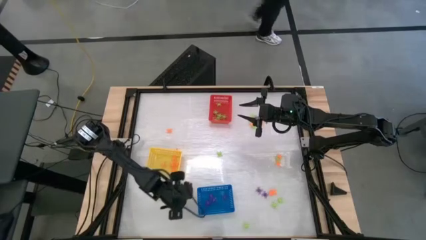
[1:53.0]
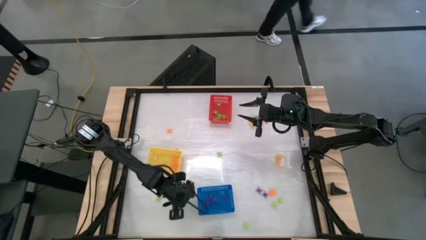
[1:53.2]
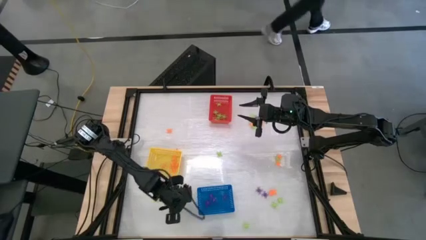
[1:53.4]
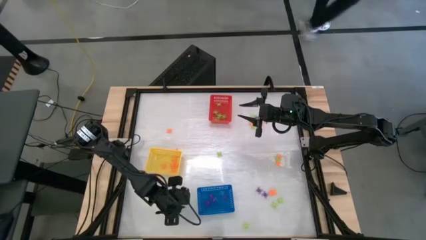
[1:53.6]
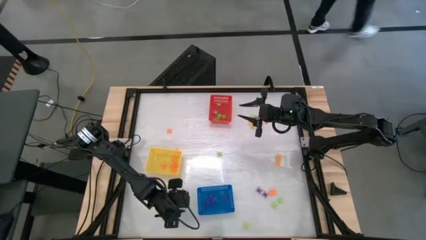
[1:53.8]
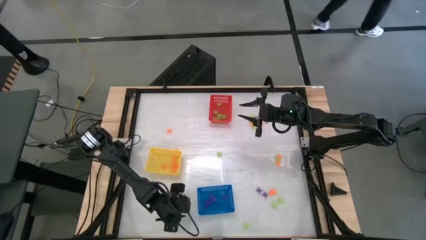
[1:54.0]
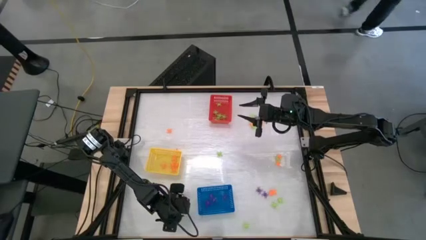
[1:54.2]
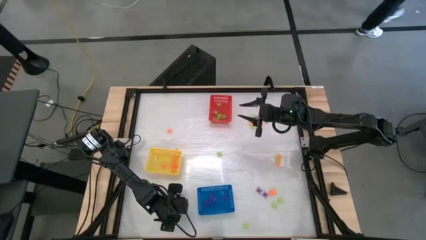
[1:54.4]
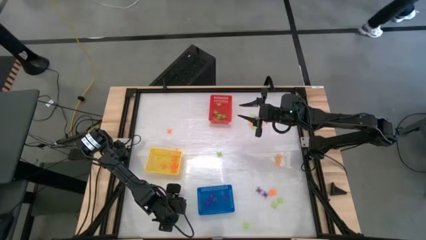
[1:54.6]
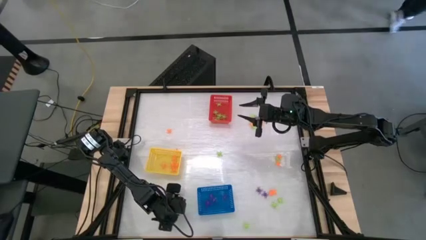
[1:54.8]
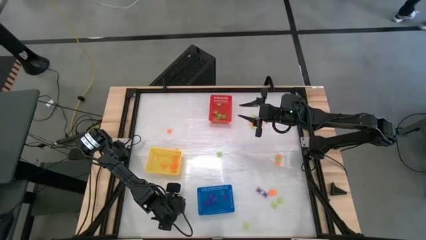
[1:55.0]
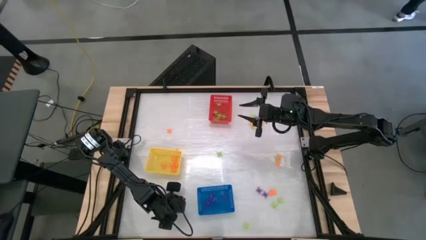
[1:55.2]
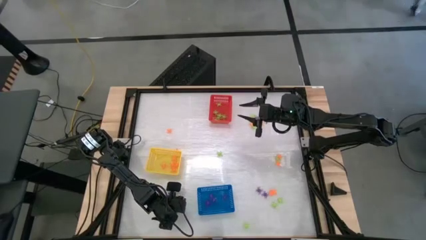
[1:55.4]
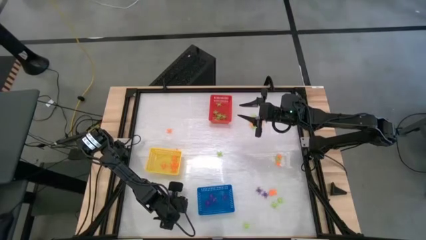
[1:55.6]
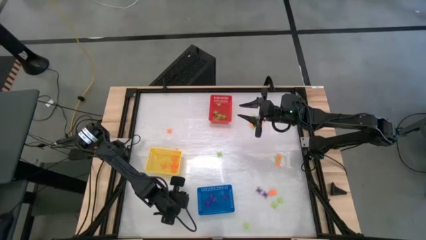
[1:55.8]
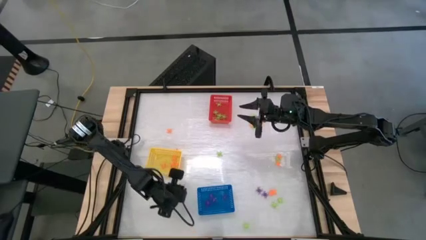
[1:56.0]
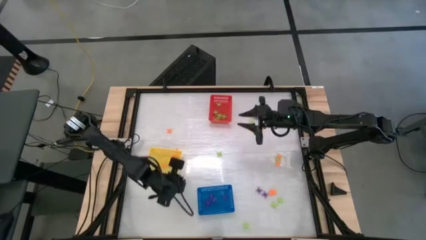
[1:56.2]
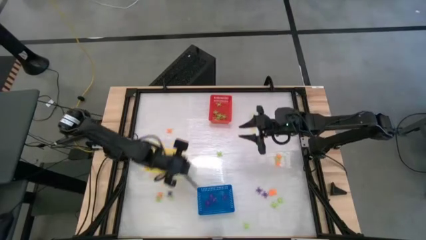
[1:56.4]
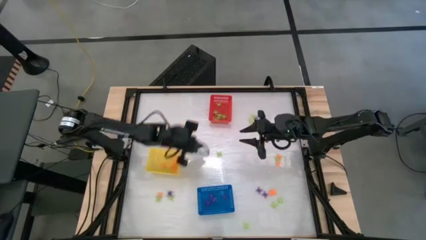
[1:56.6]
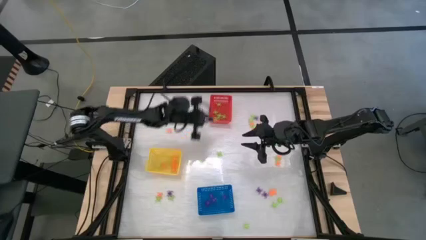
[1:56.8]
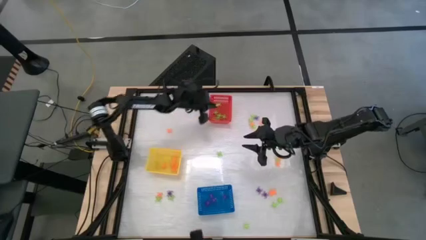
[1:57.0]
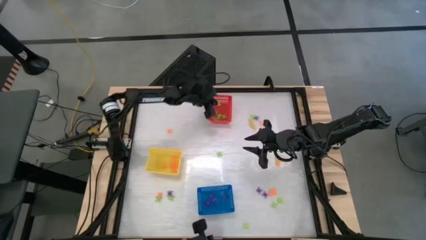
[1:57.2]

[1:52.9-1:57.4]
Task: Sort Halloween decoration
Put the green spider toy into the red basket

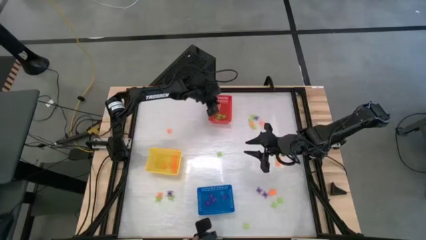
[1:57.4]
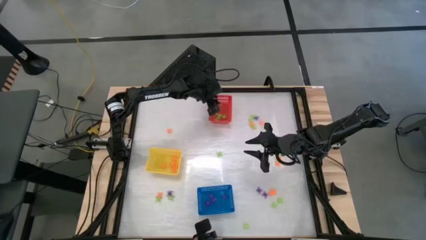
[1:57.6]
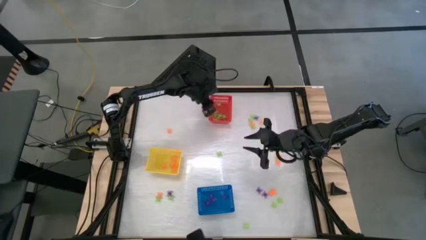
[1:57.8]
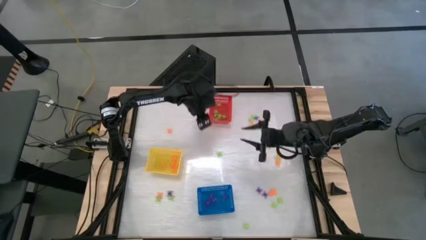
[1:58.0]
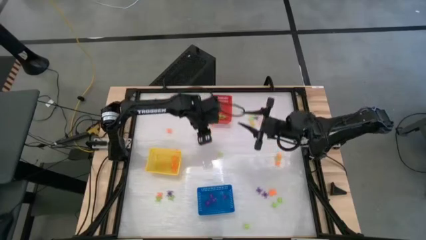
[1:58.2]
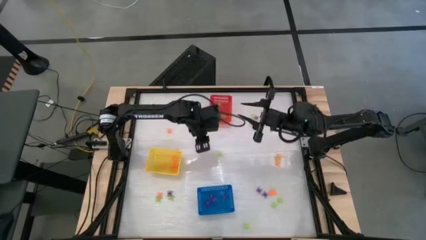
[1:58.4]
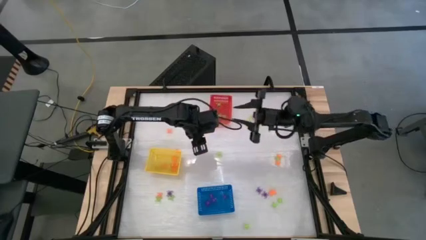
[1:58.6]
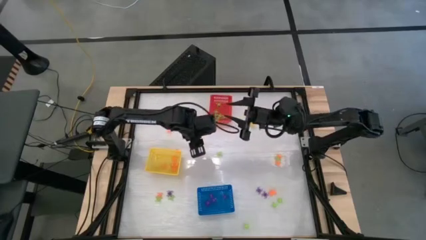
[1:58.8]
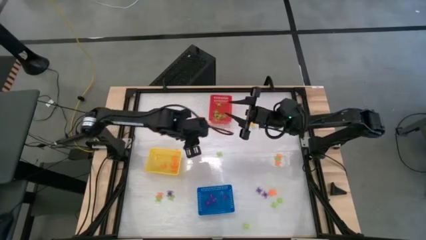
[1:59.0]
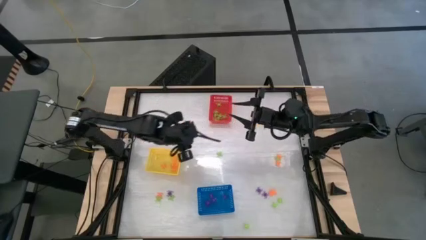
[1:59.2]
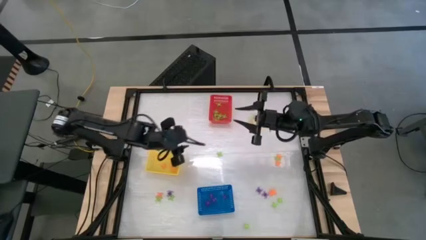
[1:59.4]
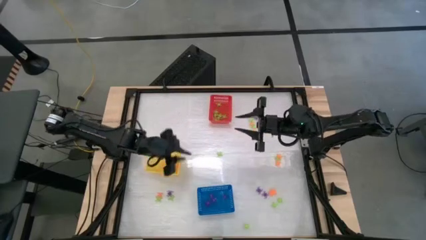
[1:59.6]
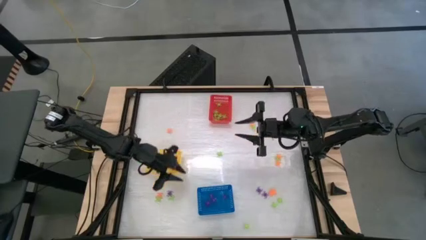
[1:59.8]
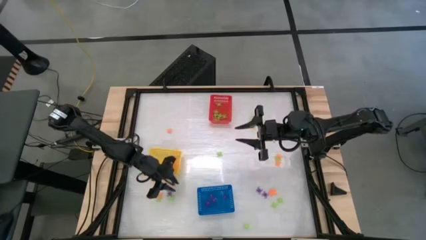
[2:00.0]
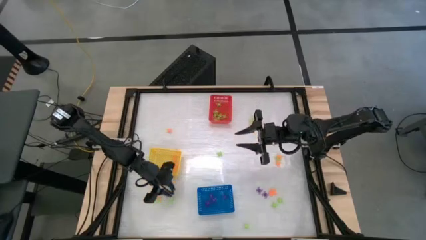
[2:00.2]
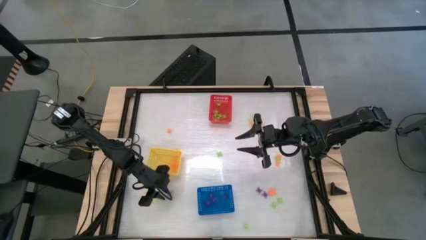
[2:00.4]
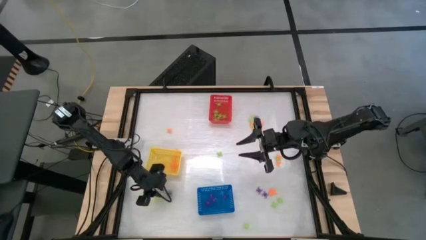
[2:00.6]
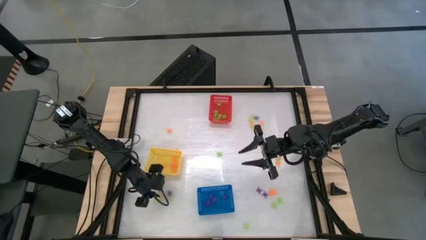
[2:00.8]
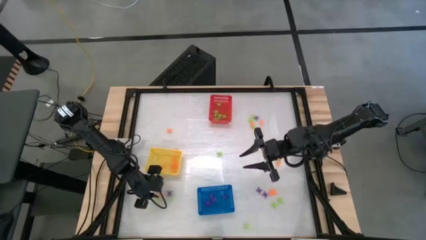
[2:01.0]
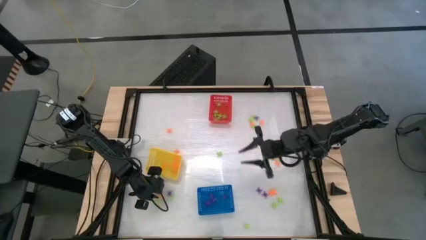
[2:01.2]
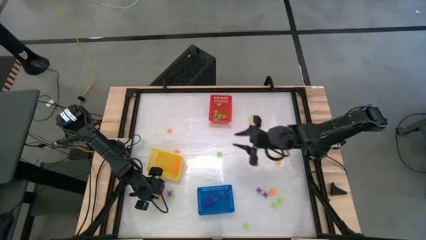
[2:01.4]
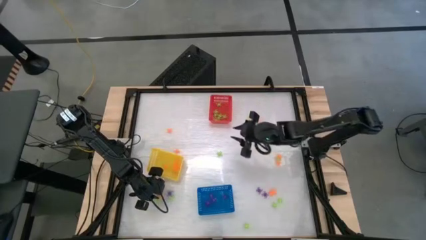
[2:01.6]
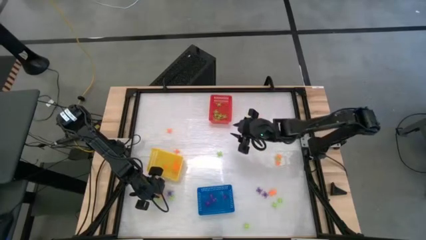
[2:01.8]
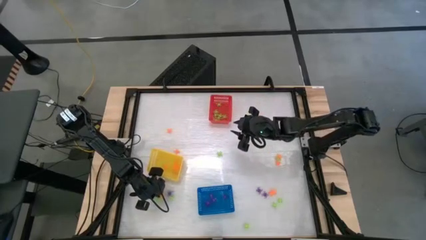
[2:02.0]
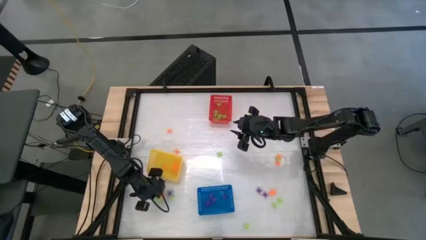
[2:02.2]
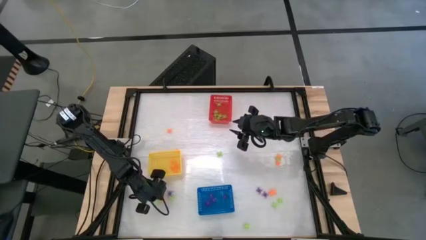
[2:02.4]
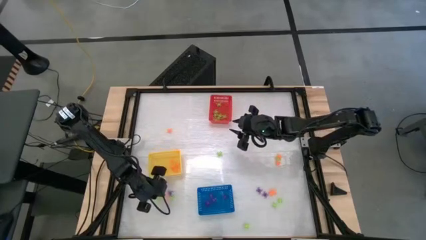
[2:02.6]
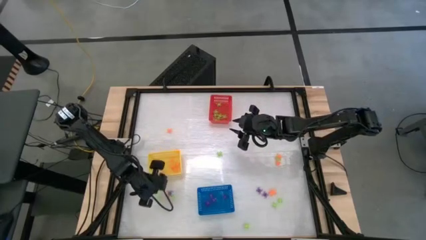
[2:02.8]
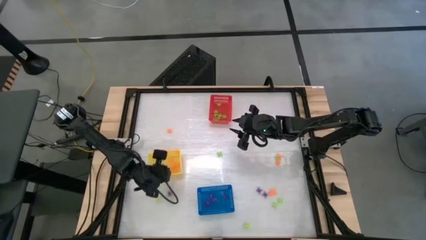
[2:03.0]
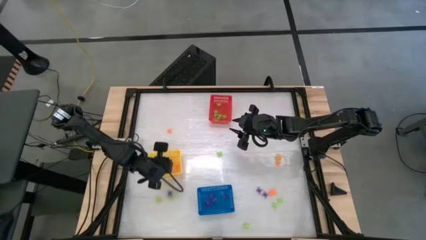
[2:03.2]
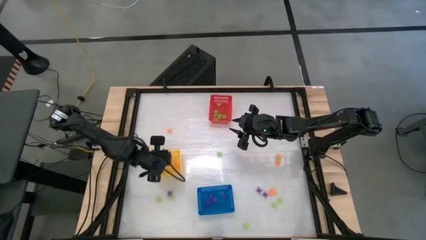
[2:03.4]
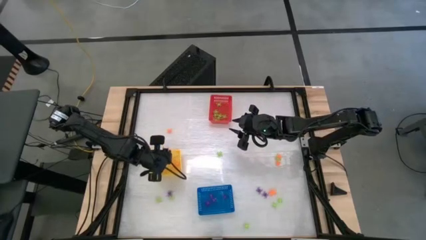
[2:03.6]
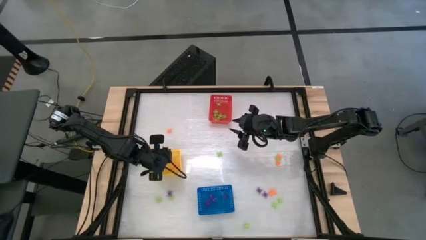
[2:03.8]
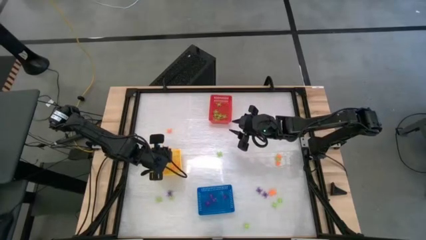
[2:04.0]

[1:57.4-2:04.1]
Put the orange spider toy into the yellow basket

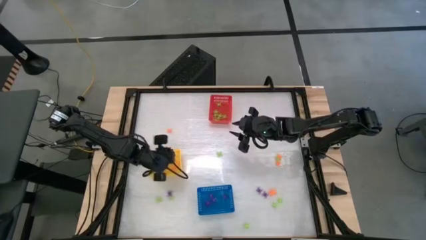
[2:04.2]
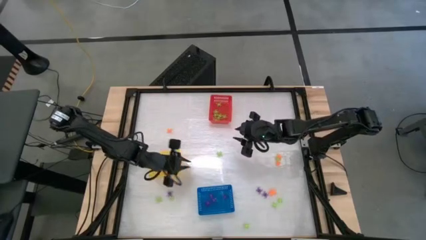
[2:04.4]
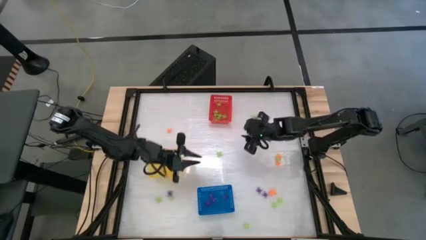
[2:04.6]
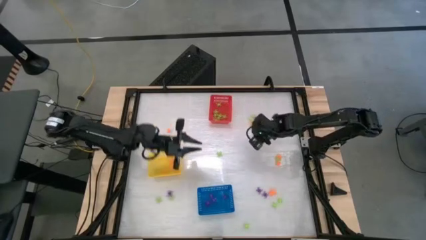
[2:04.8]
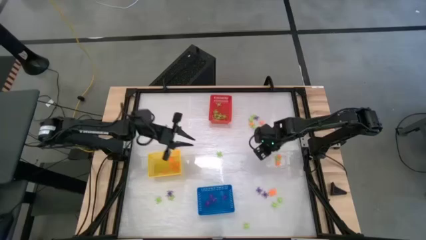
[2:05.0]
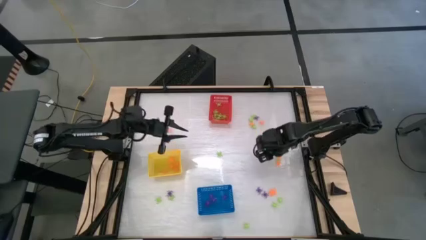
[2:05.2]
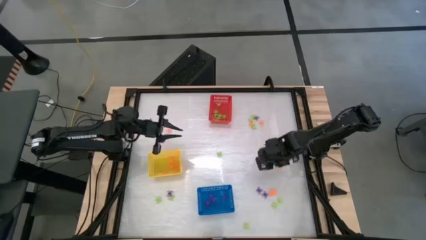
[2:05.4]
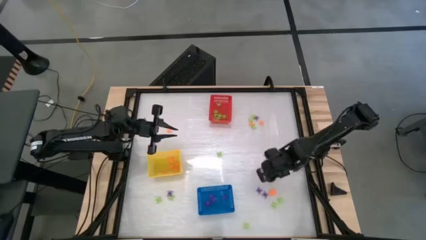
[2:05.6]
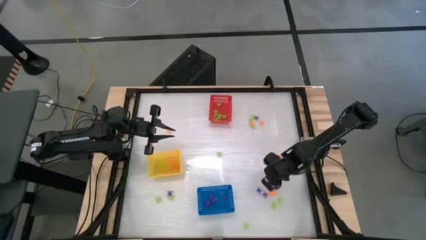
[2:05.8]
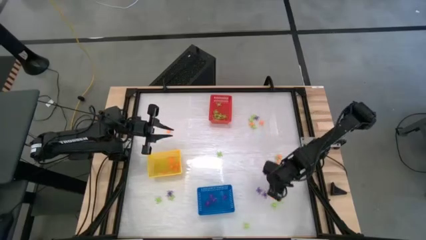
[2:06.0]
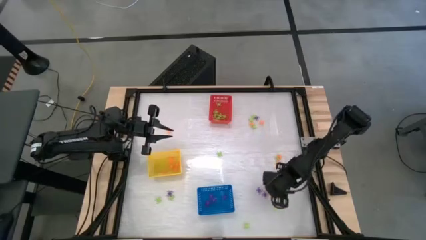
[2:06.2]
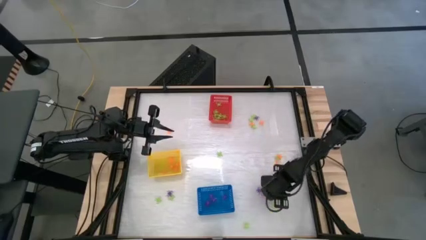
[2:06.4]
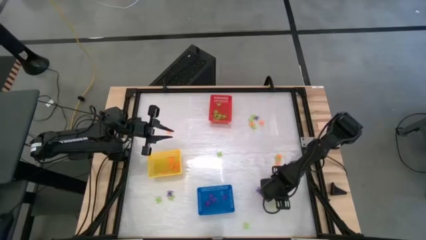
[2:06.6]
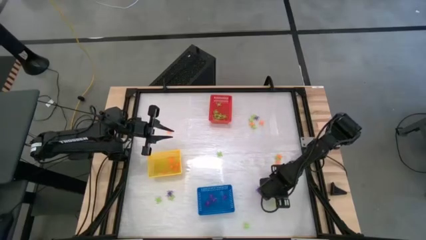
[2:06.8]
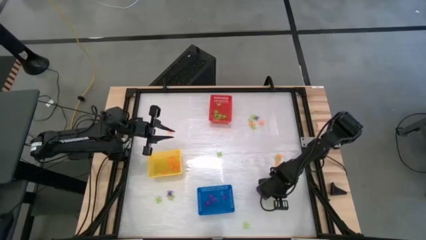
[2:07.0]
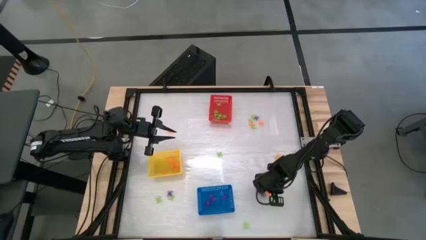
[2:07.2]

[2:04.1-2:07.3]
Put the orange spider toy into the yellow basket

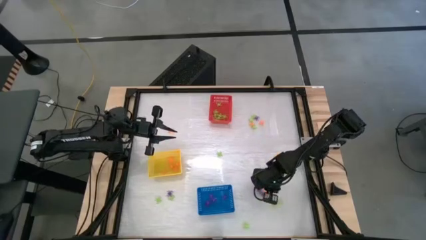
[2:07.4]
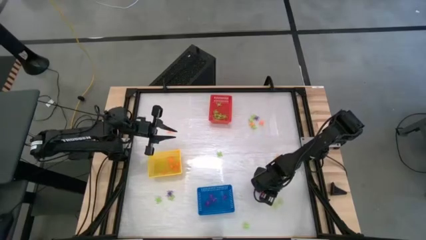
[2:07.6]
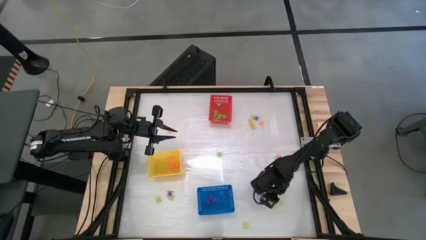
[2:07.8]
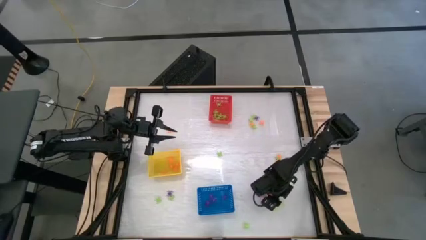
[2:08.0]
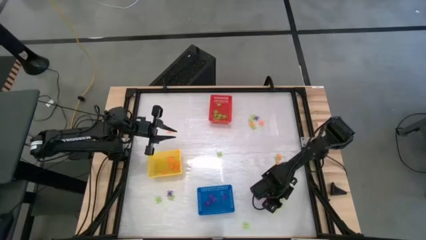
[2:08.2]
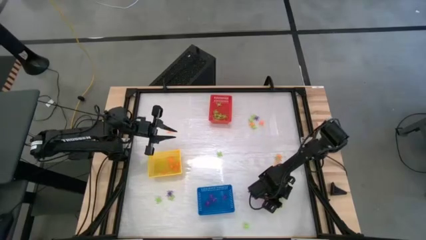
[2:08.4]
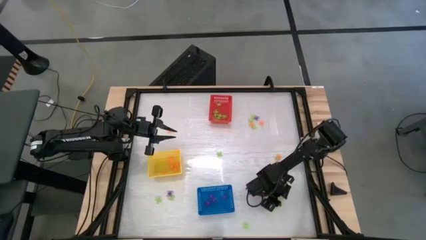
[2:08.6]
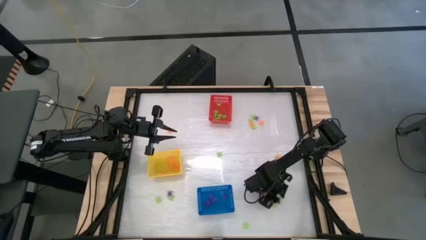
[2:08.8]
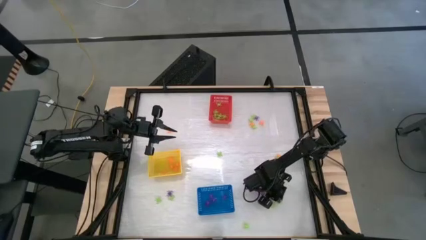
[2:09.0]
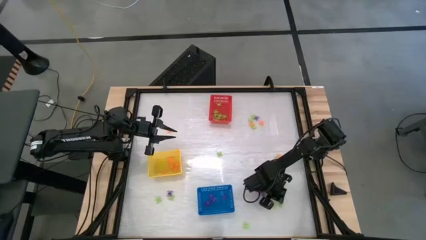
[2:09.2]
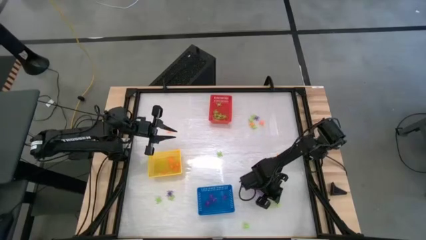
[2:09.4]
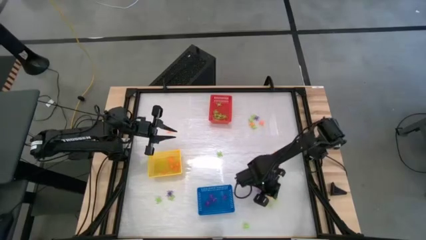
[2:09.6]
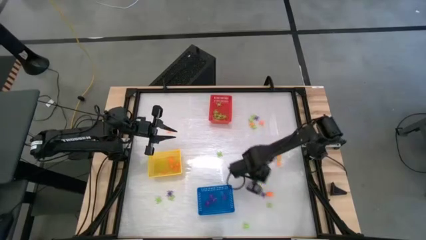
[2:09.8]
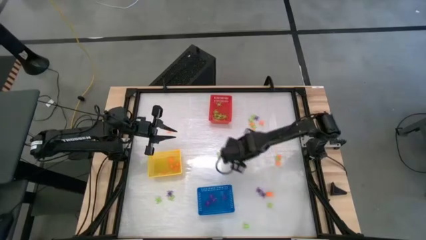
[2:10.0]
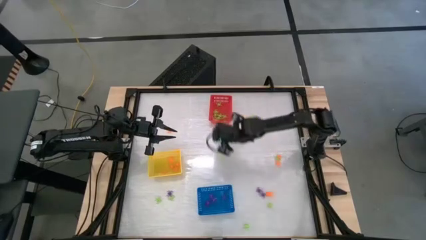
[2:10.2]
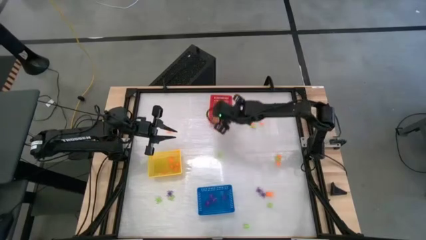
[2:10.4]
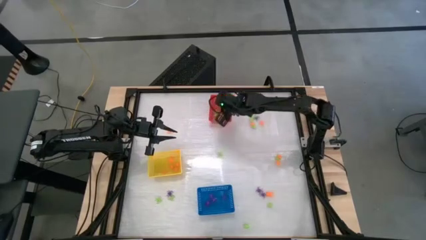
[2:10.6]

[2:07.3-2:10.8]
Put the green spider toy into the red basket
